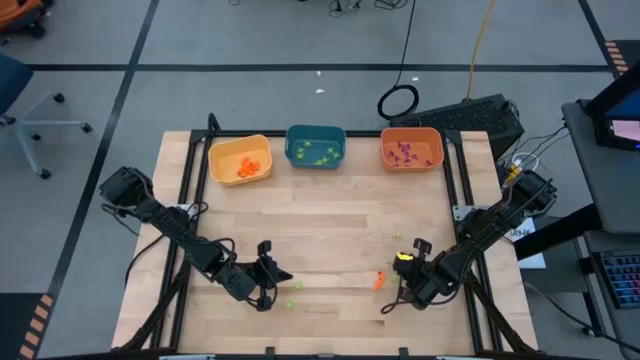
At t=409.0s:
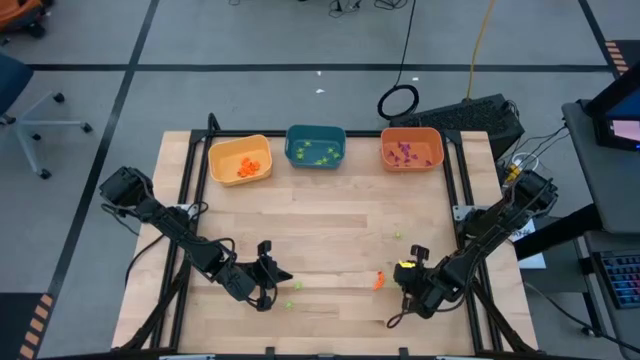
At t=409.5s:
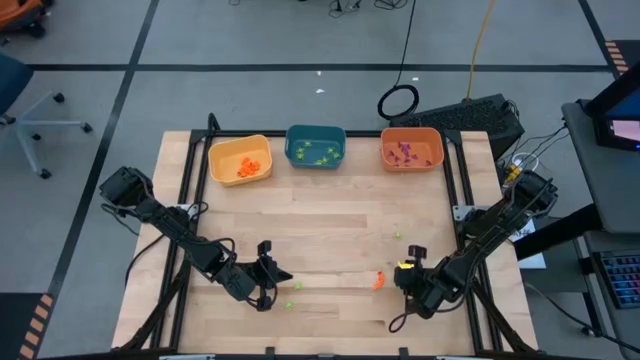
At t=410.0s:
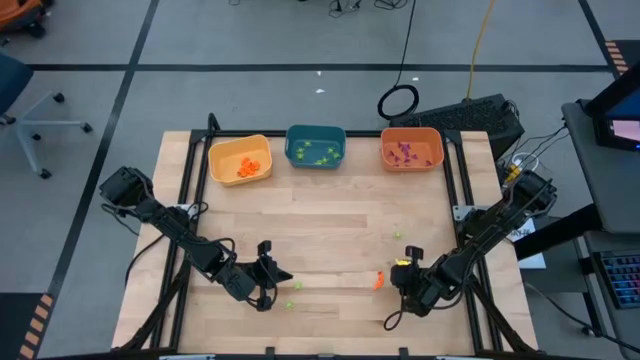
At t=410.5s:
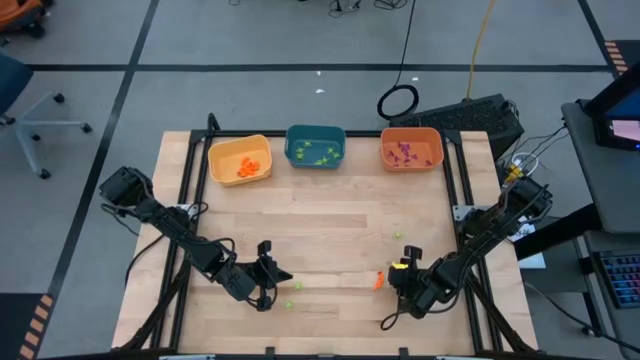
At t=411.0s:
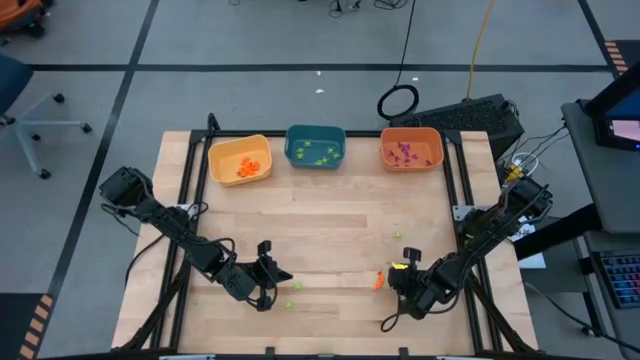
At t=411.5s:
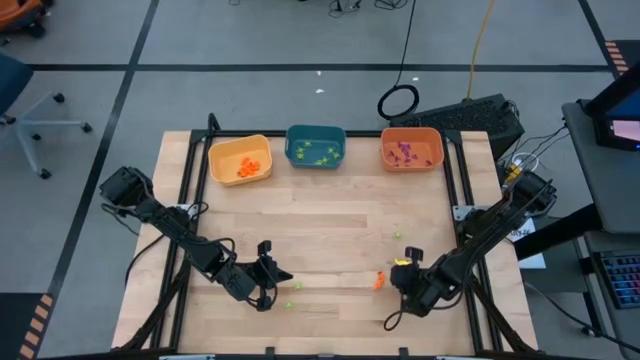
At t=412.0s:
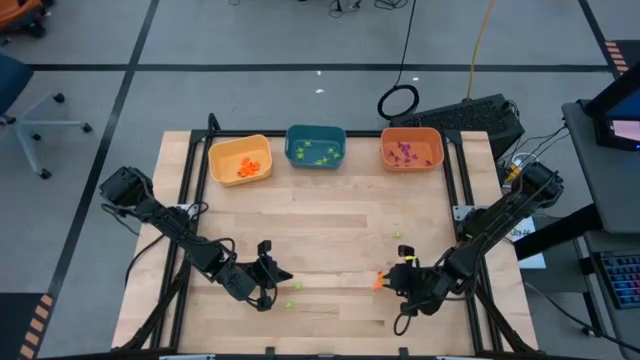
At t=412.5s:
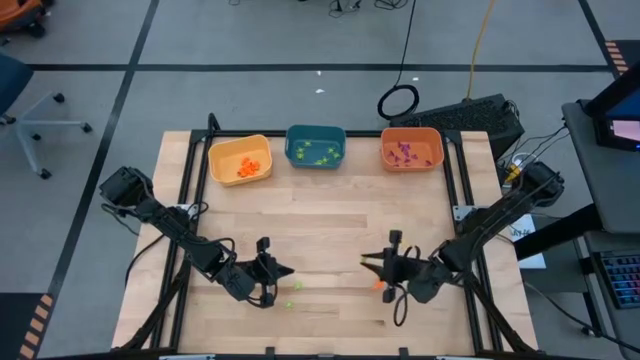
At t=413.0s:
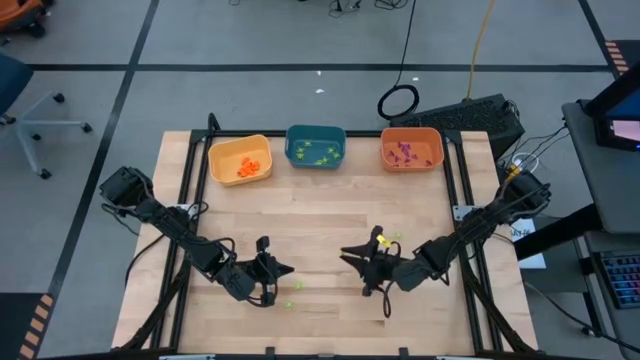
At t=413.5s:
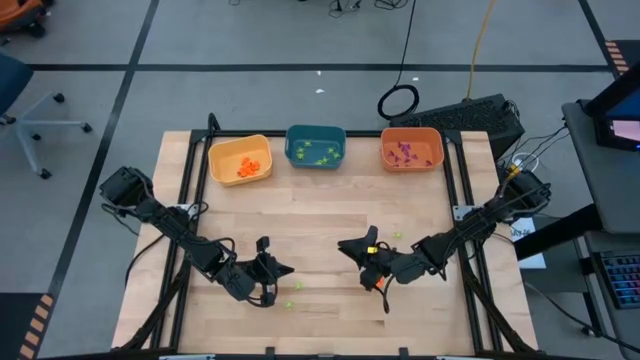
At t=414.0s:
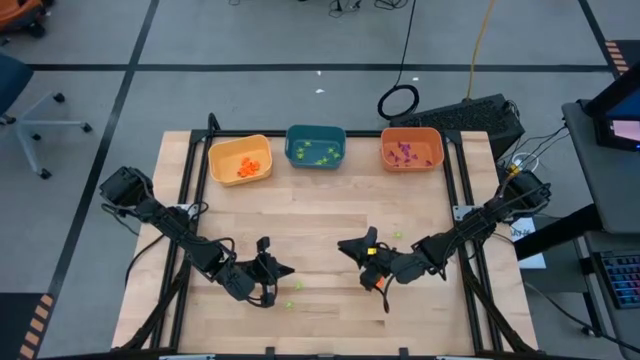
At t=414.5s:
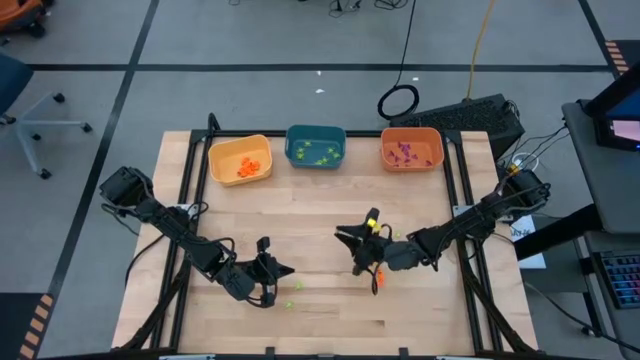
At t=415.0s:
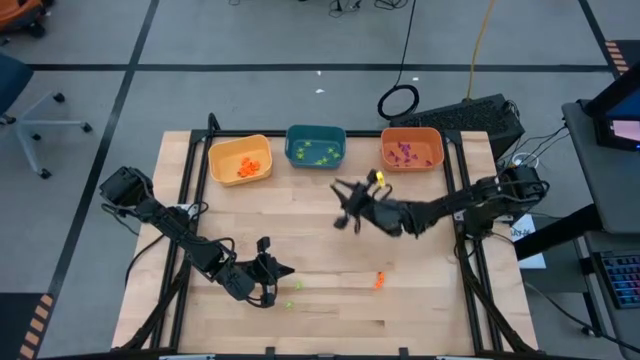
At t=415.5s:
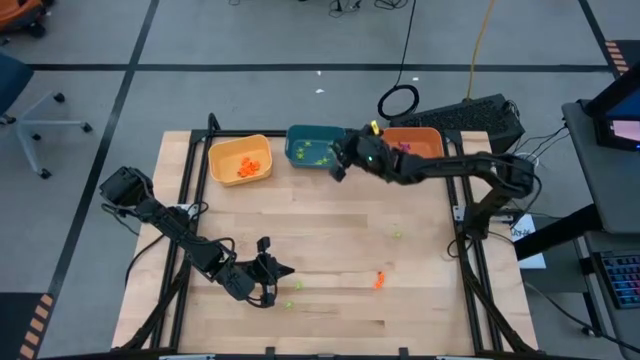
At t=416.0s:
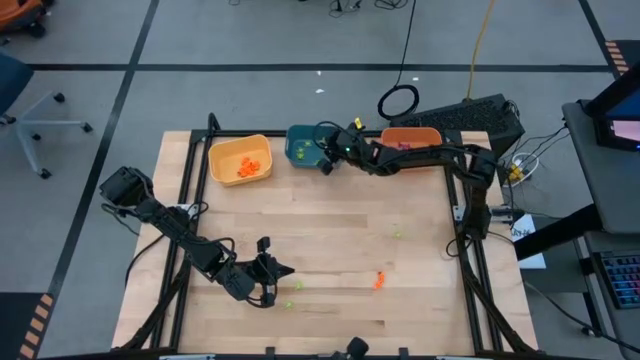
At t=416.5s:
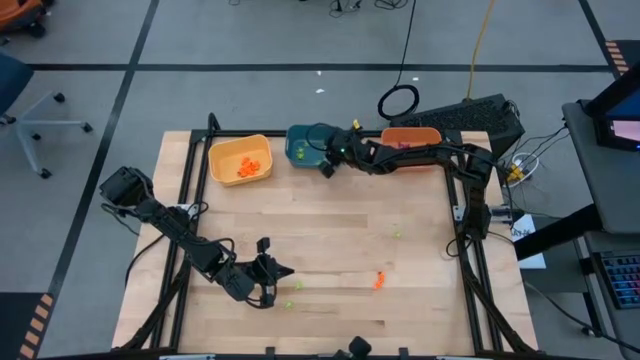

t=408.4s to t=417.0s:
Task: Sort Halloween decoration
Put the green spider toy into the blue bin

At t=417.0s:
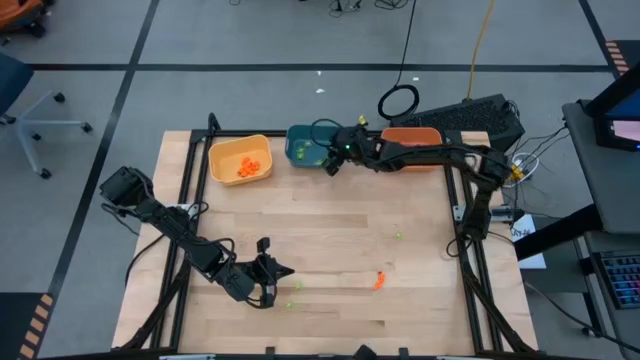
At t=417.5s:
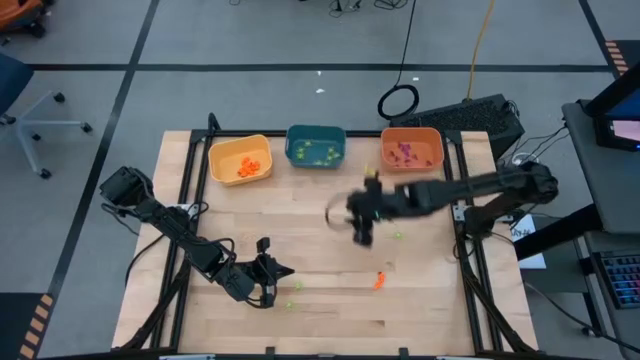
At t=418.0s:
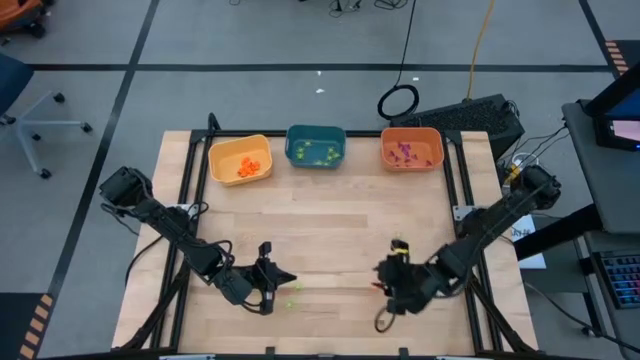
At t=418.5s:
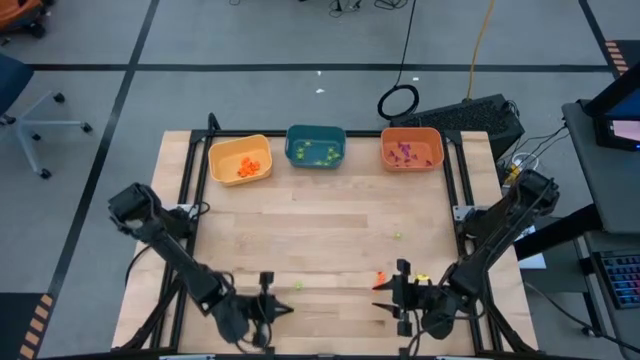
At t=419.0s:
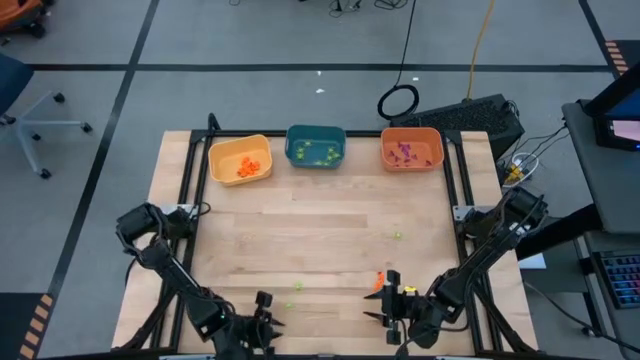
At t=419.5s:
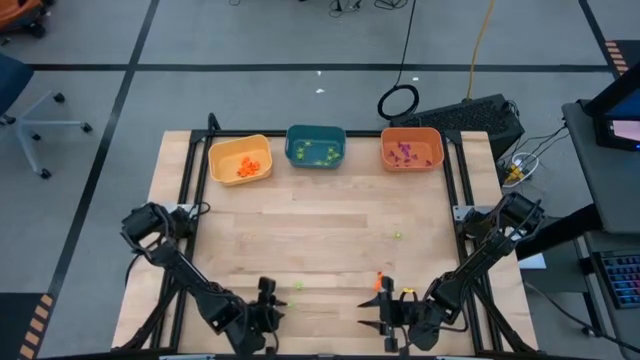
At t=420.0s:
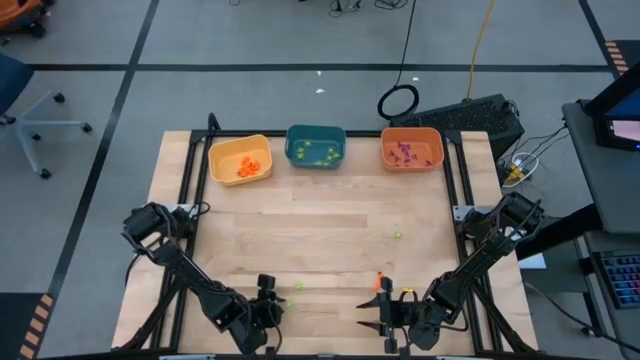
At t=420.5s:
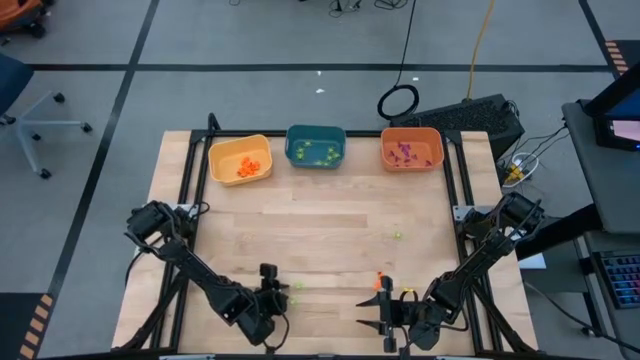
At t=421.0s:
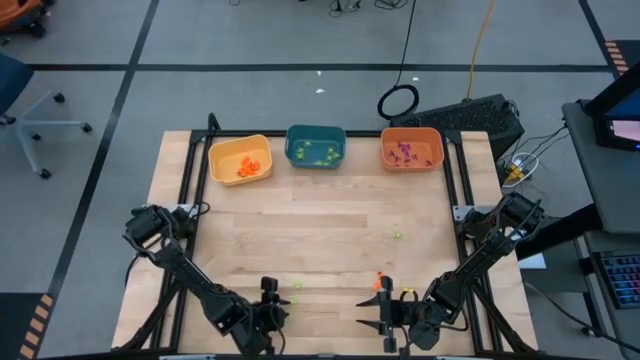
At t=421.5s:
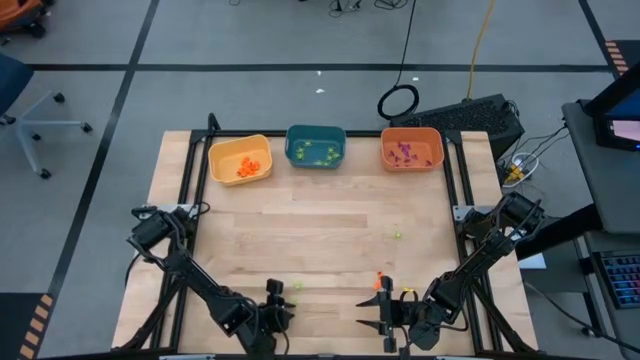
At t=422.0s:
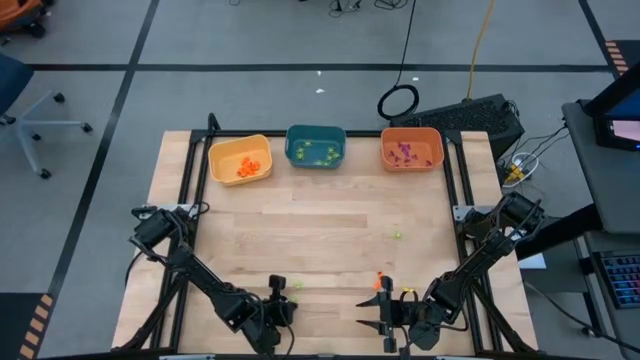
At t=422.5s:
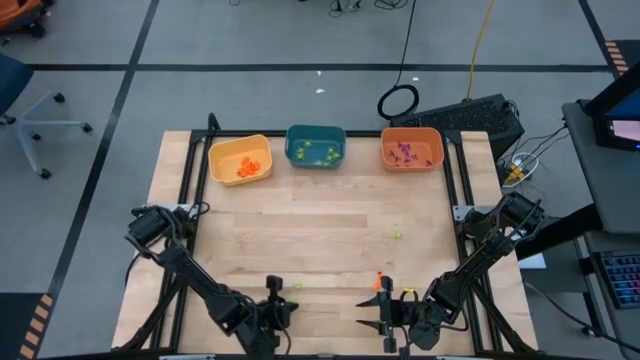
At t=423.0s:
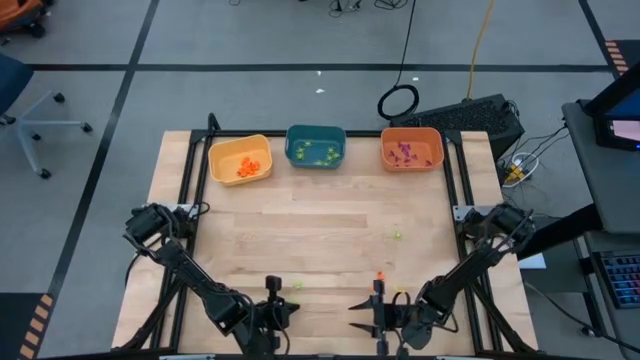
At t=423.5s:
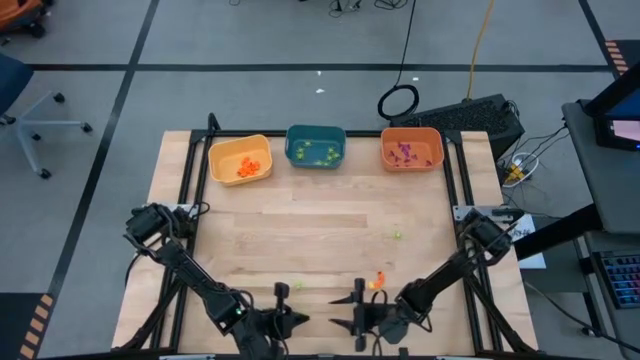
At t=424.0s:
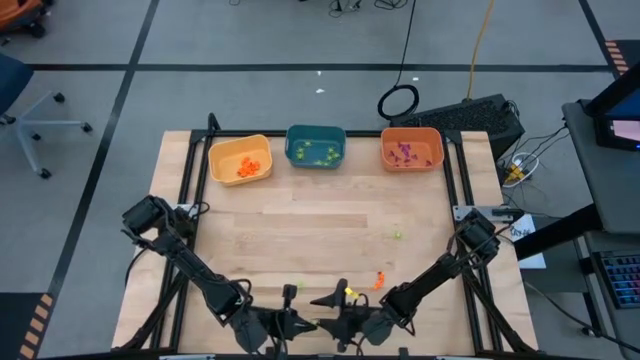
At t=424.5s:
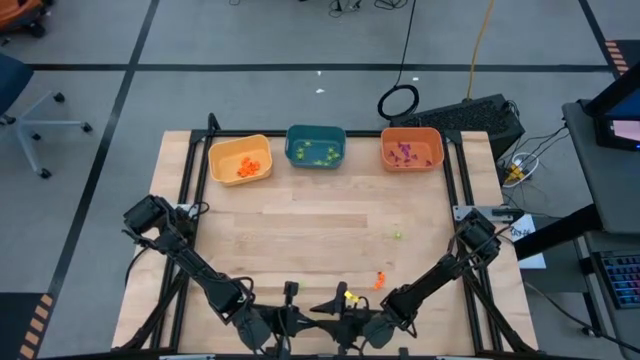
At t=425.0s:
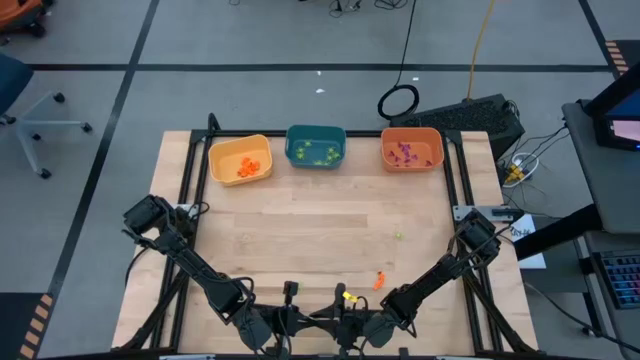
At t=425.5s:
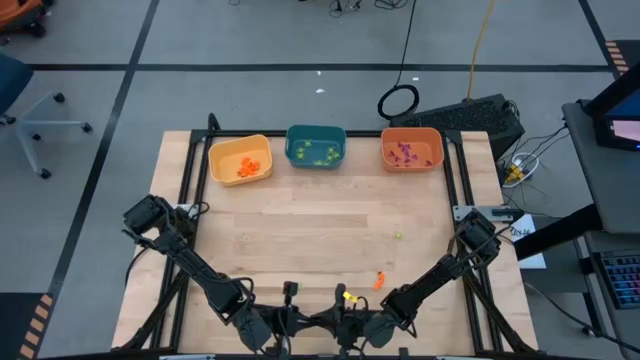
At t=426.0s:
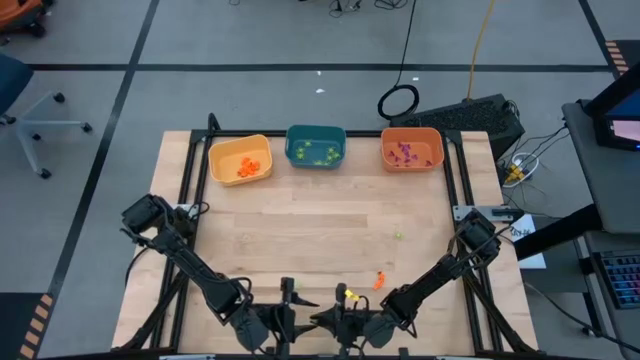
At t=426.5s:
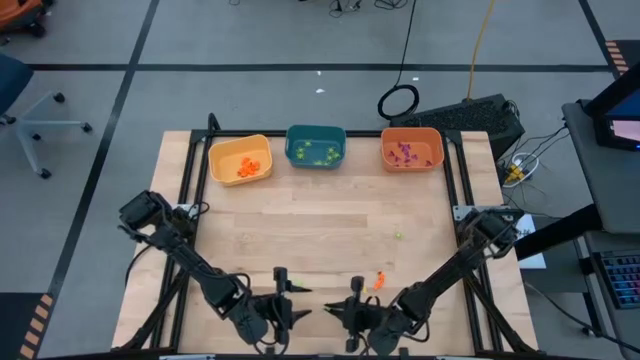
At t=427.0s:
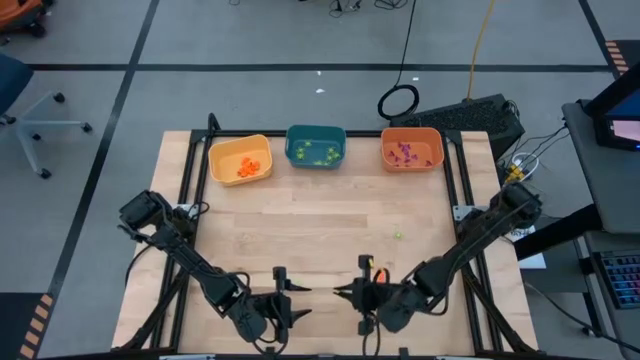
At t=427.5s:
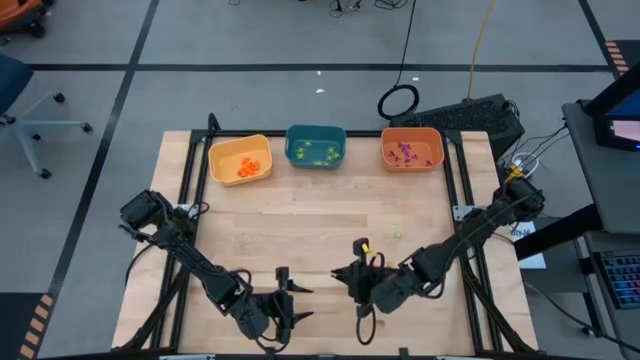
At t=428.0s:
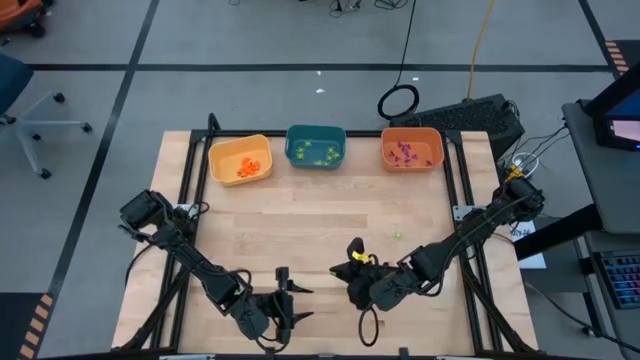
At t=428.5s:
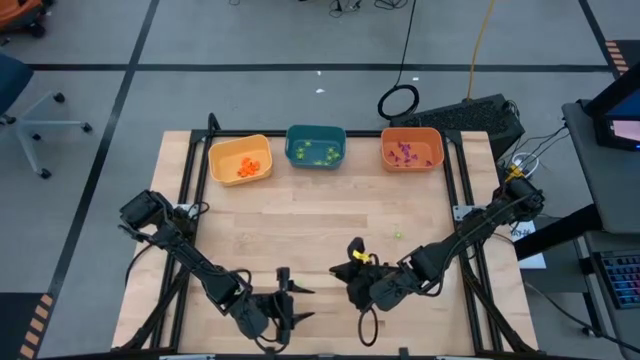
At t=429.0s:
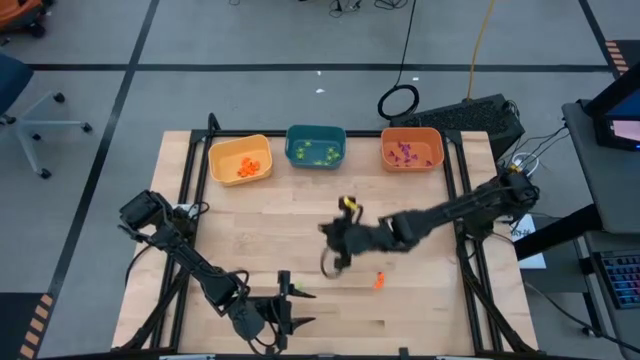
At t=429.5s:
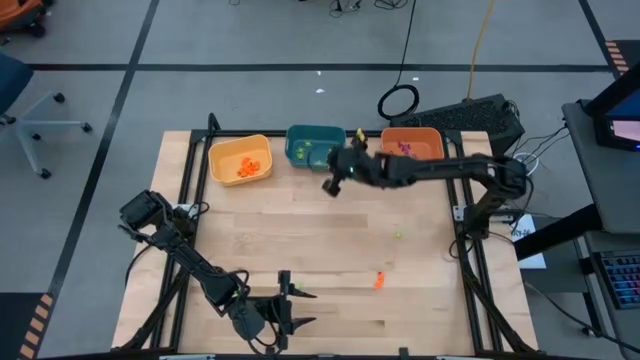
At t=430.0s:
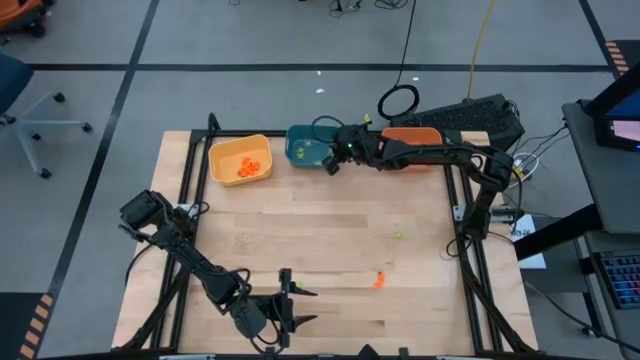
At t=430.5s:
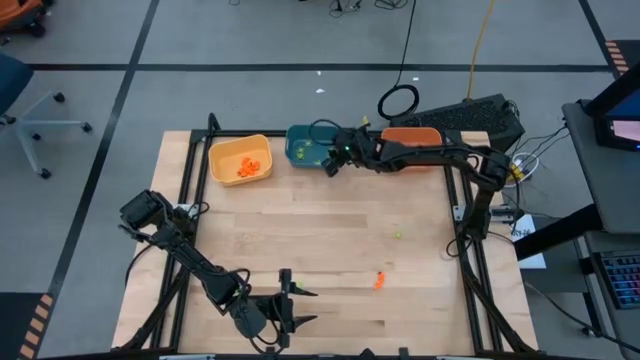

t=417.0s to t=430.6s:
Put the green spider toy into the blue bin
